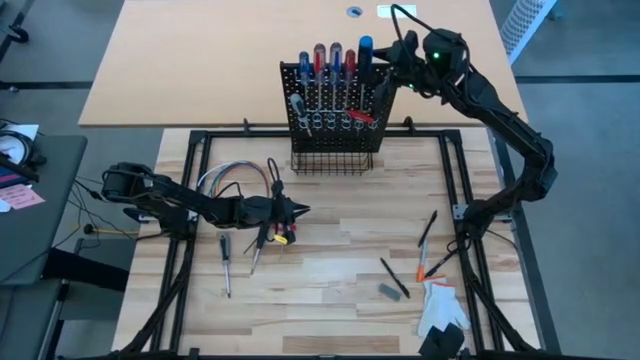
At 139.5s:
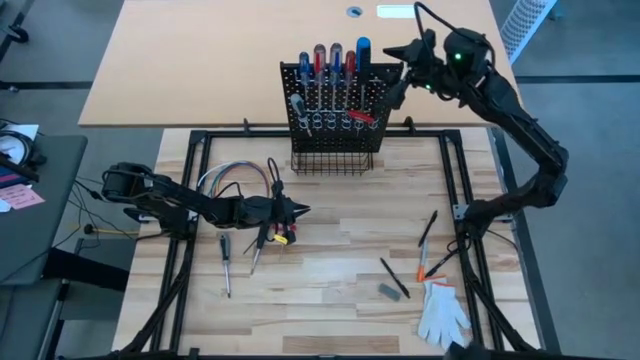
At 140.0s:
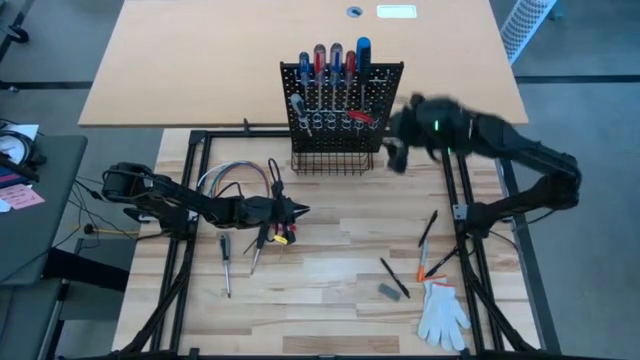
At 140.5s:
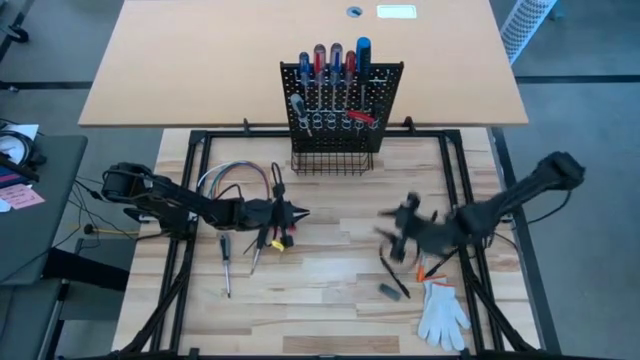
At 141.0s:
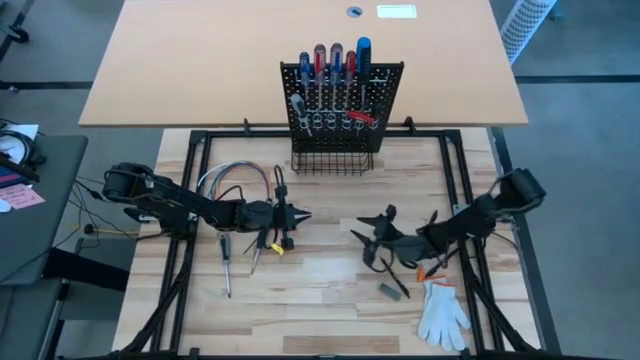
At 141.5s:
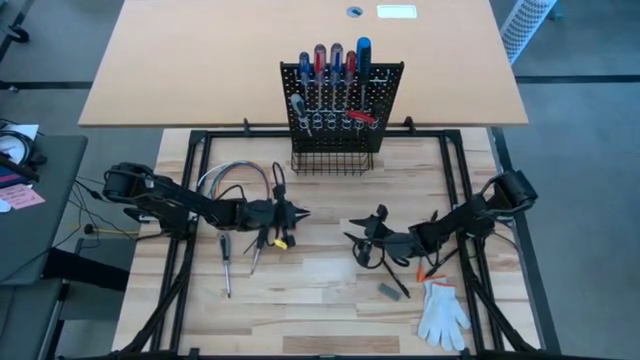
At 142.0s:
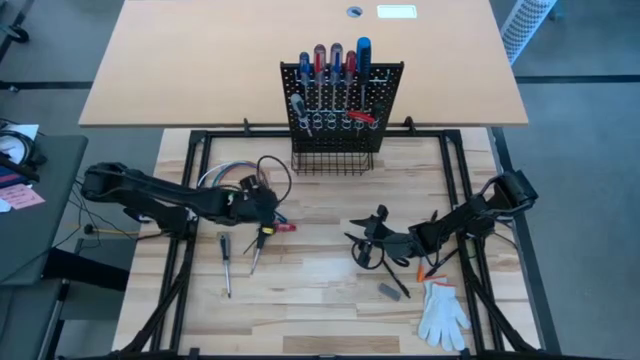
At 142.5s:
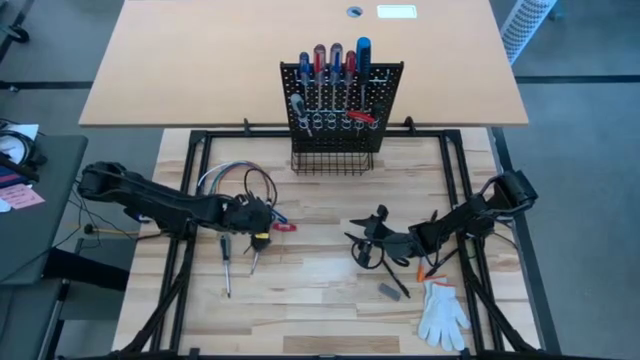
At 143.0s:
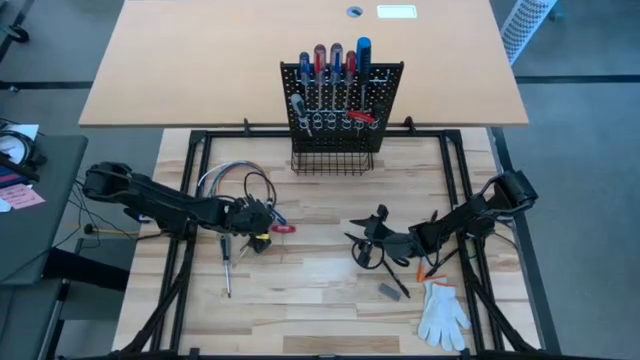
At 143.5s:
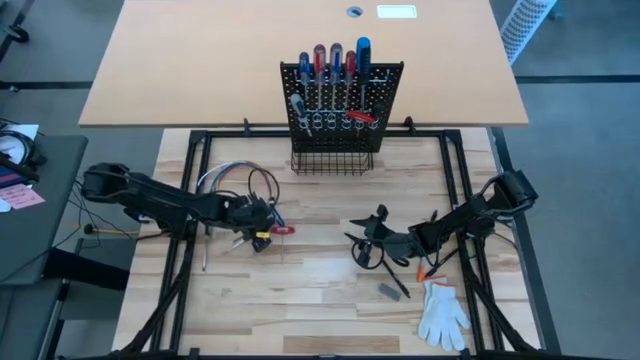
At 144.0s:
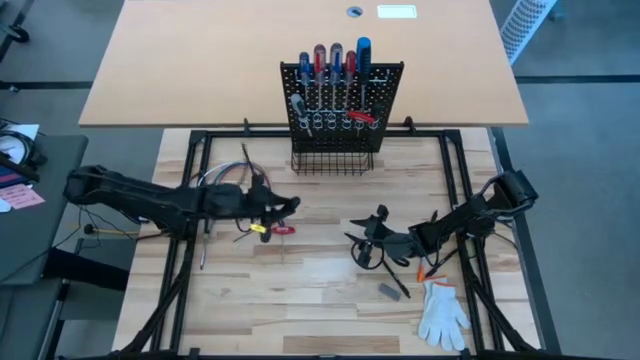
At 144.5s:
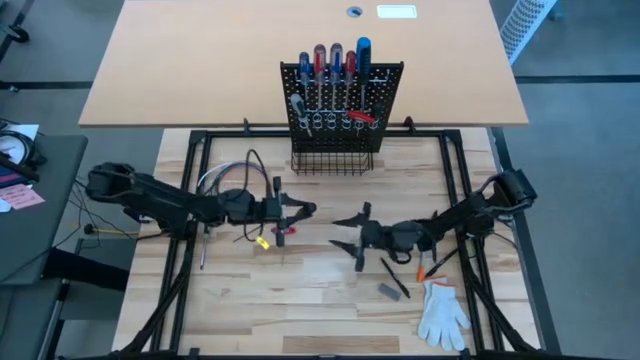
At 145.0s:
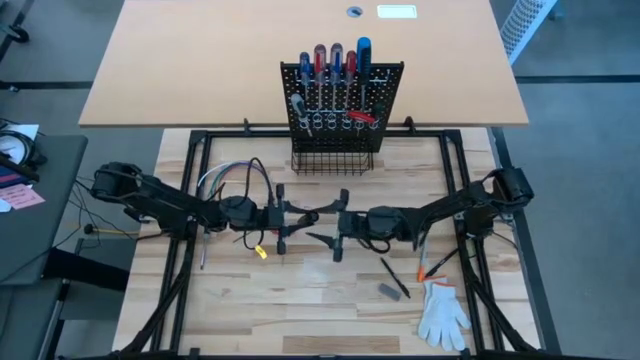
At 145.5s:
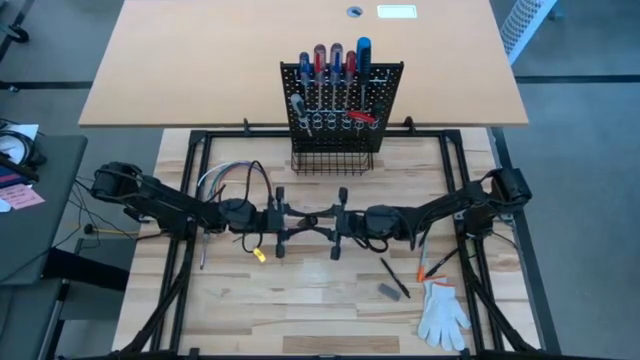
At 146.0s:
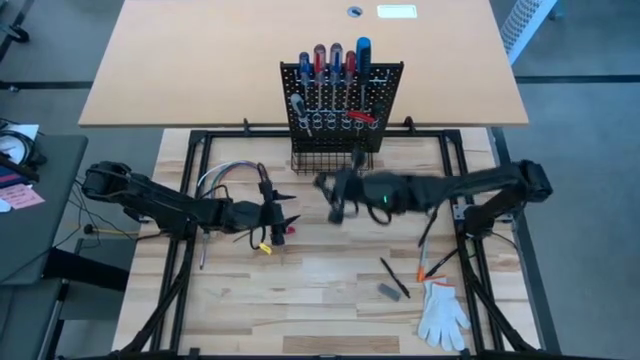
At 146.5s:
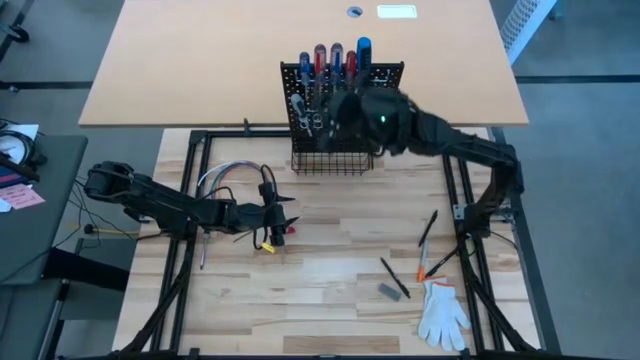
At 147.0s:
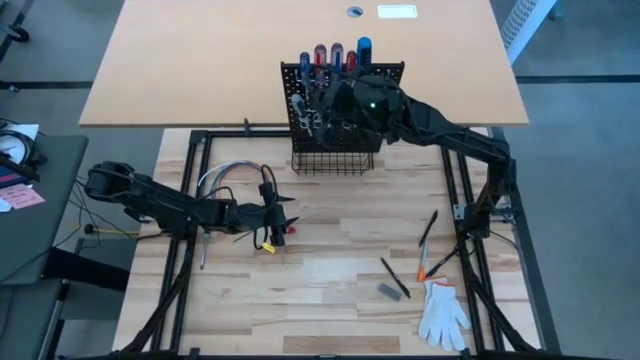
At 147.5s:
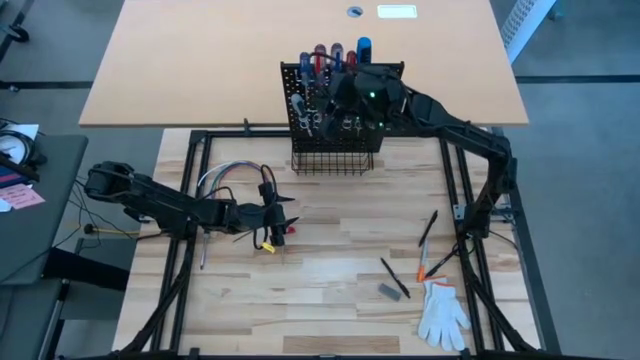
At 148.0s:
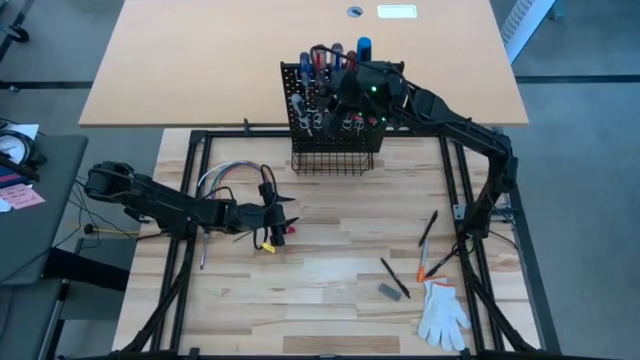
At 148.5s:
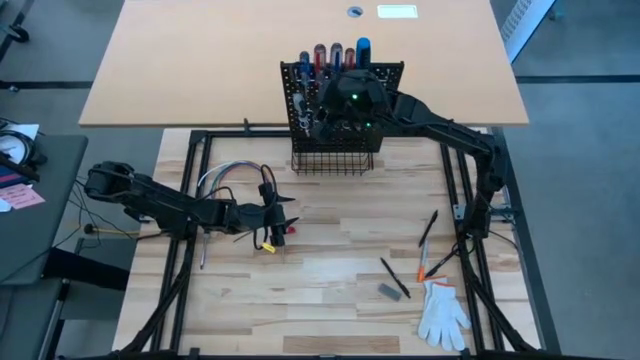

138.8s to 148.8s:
Task: Hang tools onto peg board
Hang the black screwdriver on the black peg board

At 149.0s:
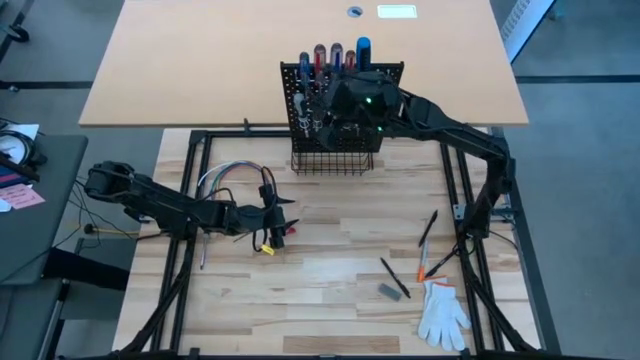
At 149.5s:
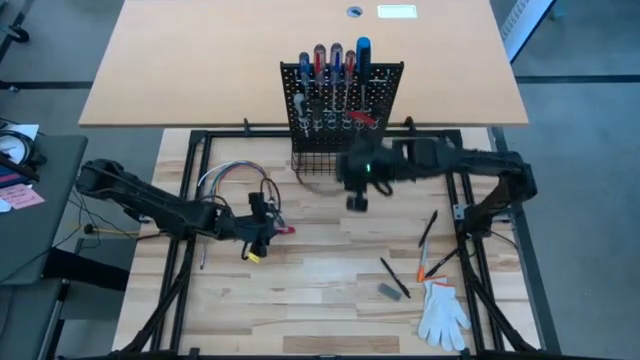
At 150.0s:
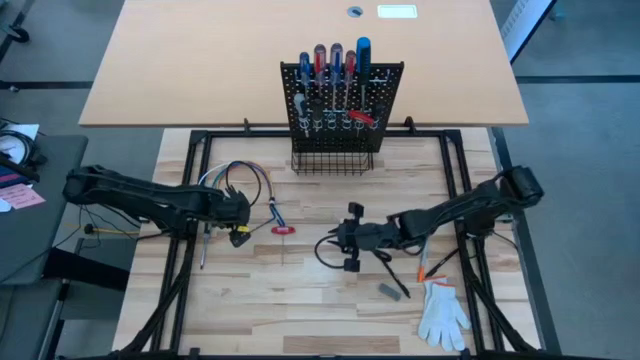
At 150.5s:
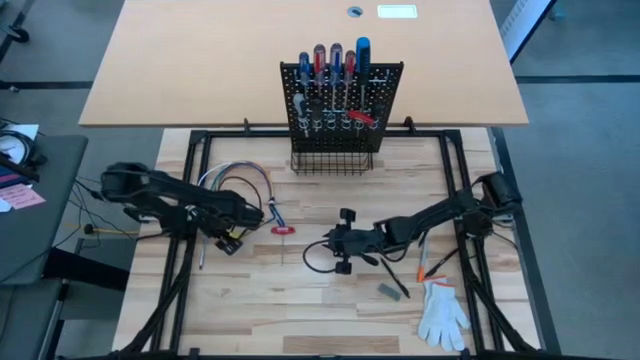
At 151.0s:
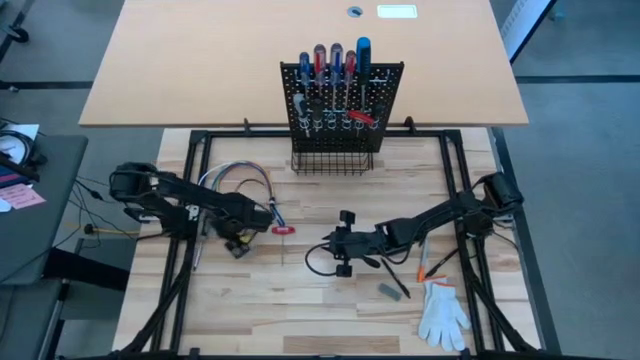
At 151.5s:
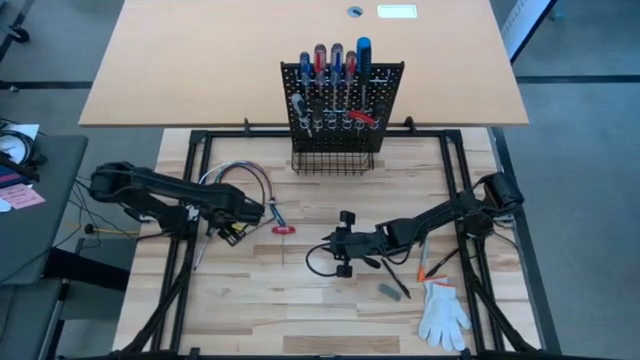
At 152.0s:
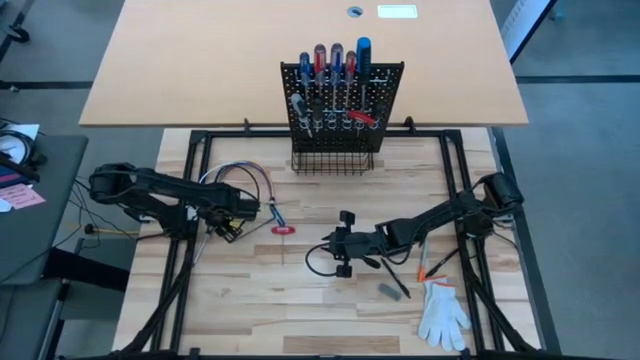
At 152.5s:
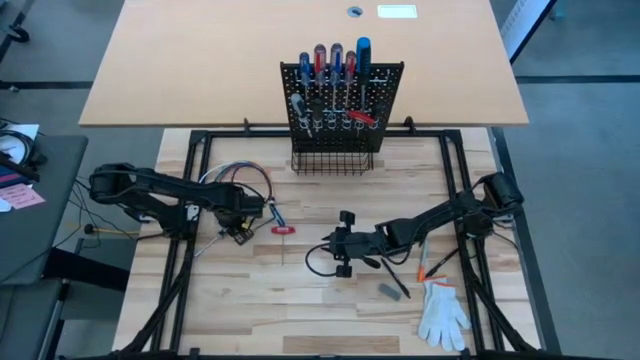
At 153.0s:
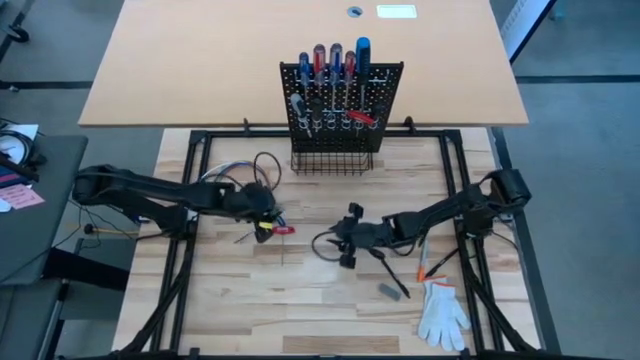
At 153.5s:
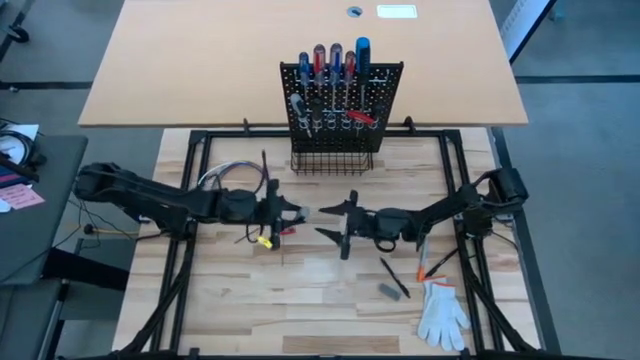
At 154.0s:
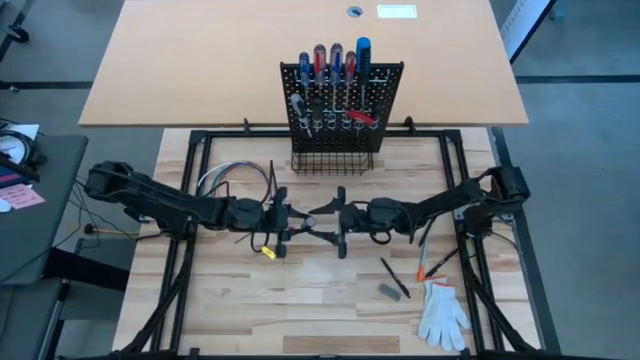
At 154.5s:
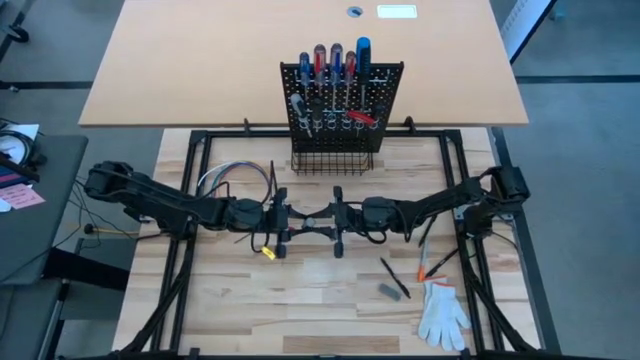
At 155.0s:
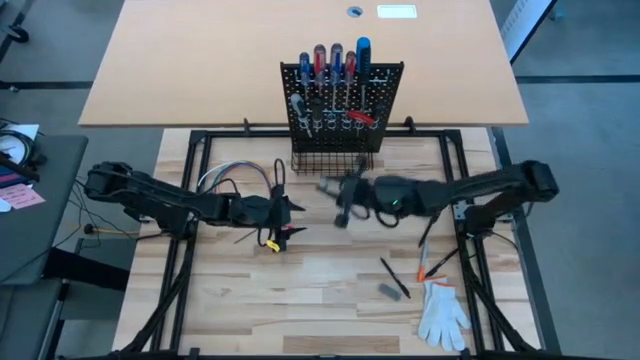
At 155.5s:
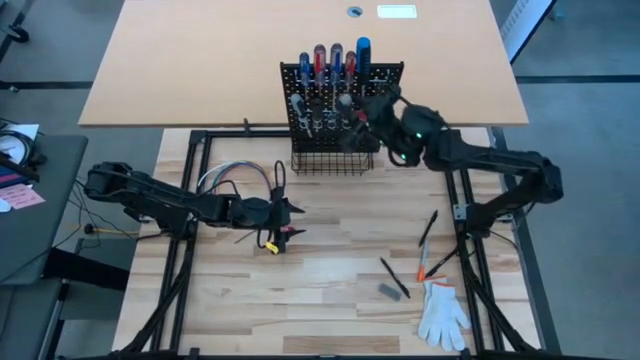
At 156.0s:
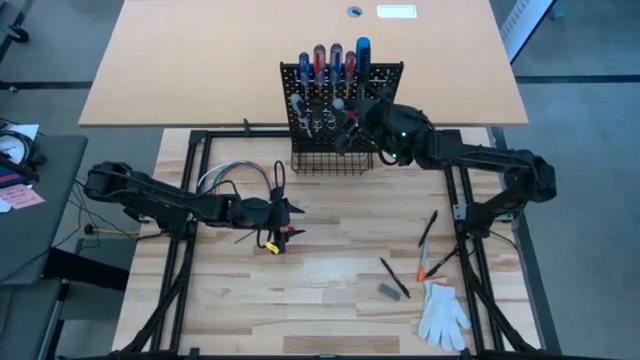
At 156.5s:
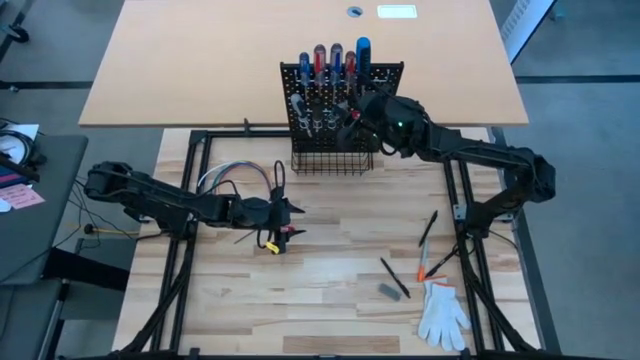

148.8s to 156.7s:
Hang the gray screwdriver on the black peg board

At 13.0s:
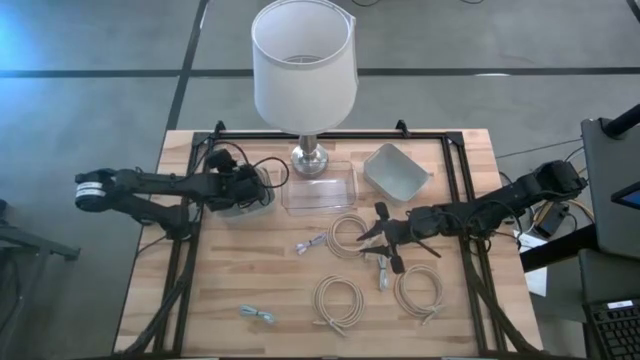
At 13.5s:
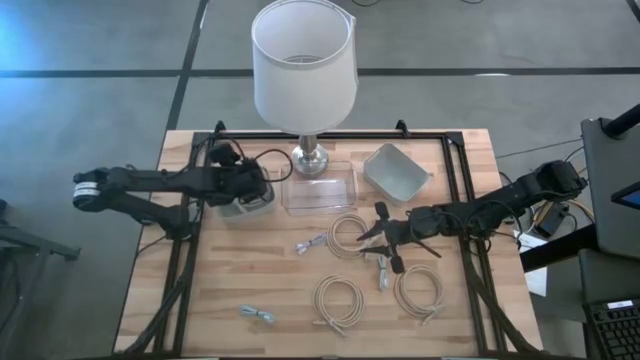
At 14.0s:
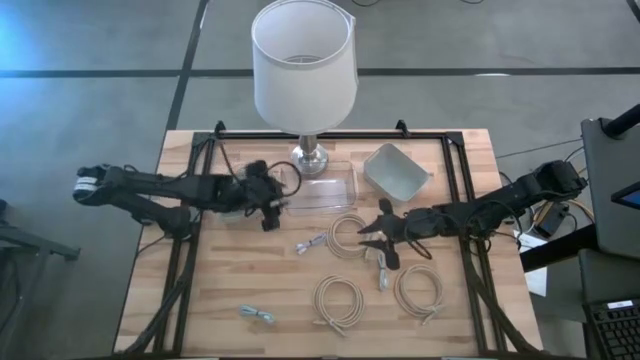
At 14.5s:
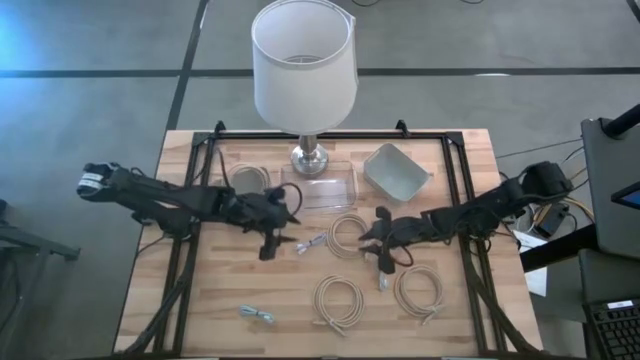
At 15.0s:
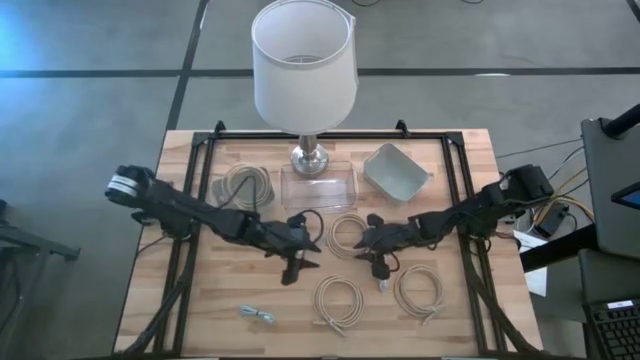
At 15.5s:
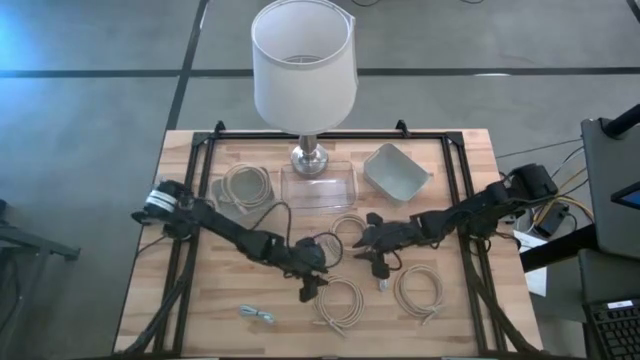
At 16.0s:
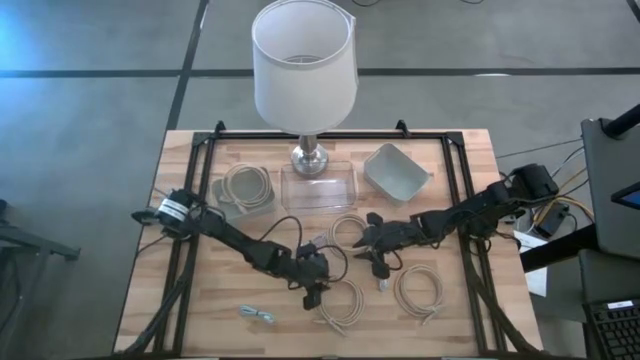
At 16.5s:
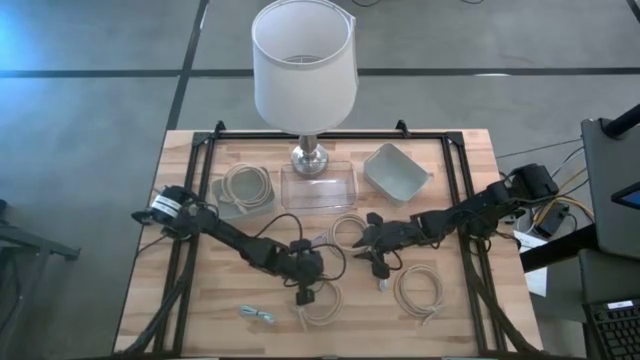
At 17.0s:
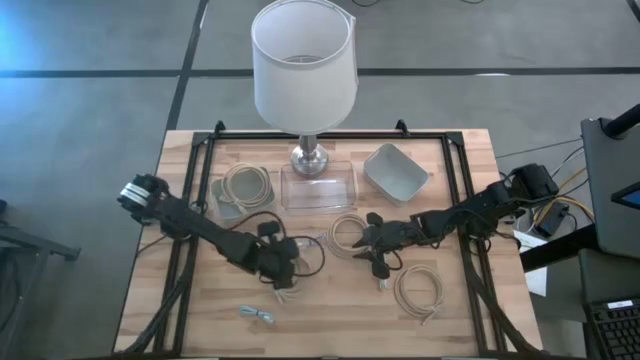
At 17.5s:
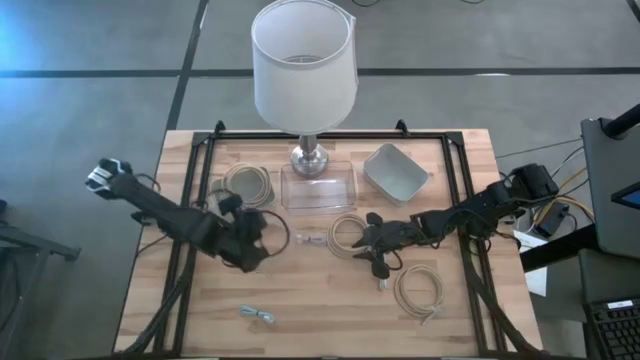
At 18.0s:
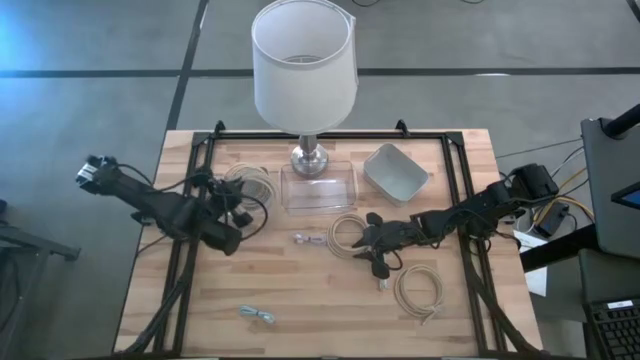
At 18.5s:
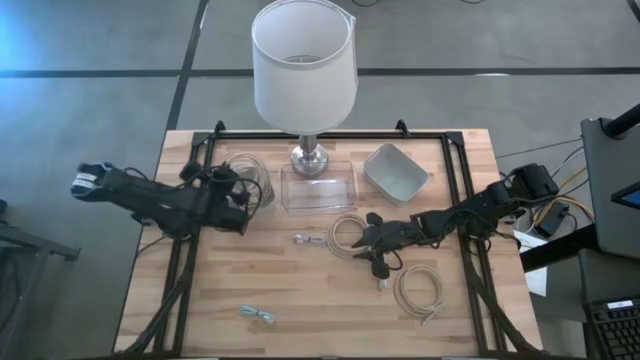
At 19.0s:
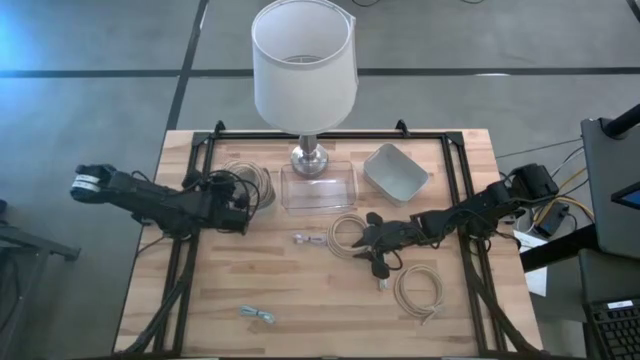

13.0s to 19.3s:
Task: Pick & Place USB Port
Put the light brown hdmi cable into the left gray bin
